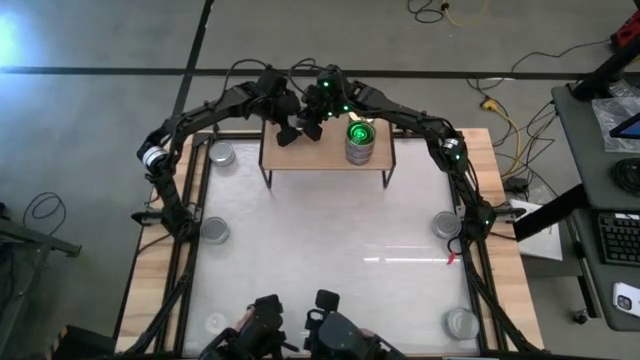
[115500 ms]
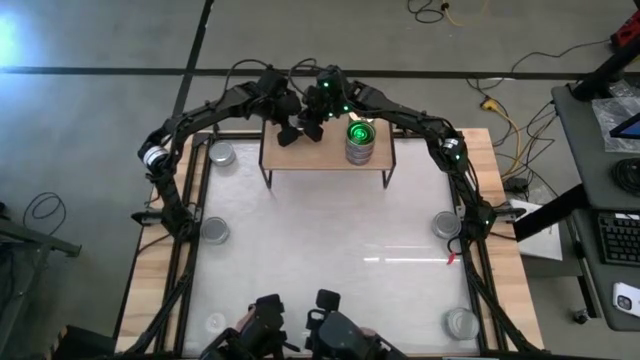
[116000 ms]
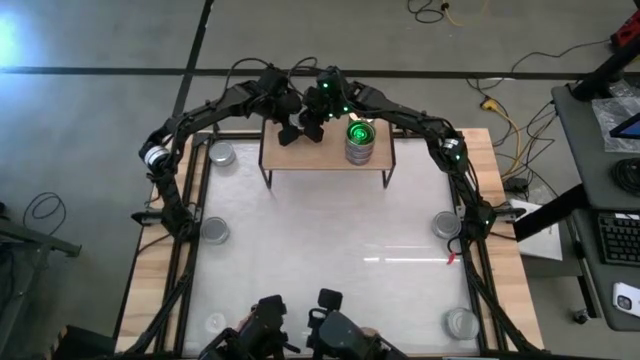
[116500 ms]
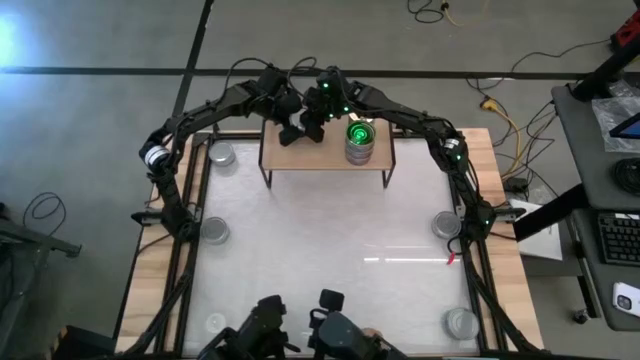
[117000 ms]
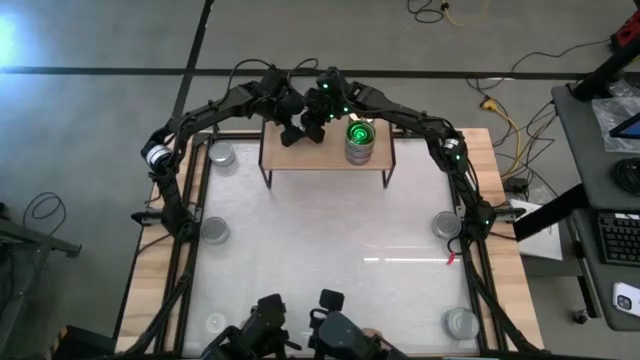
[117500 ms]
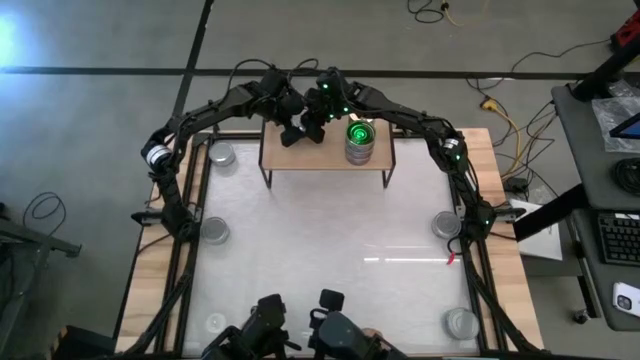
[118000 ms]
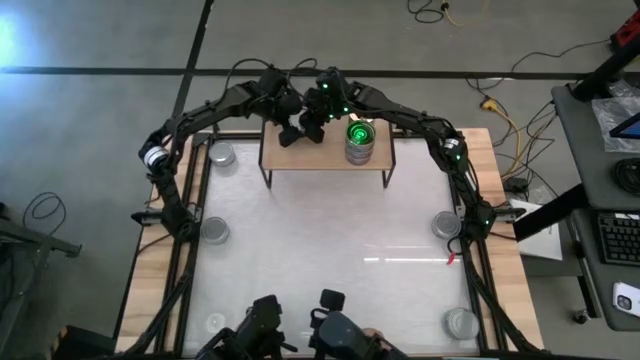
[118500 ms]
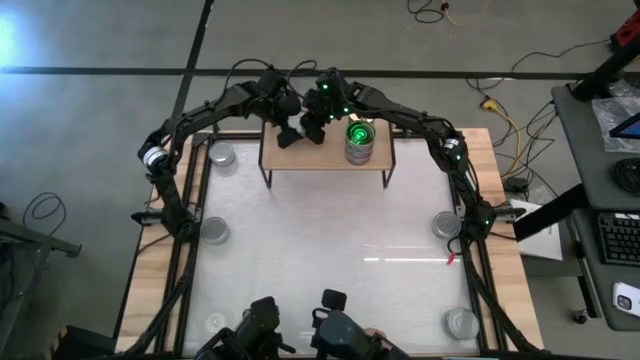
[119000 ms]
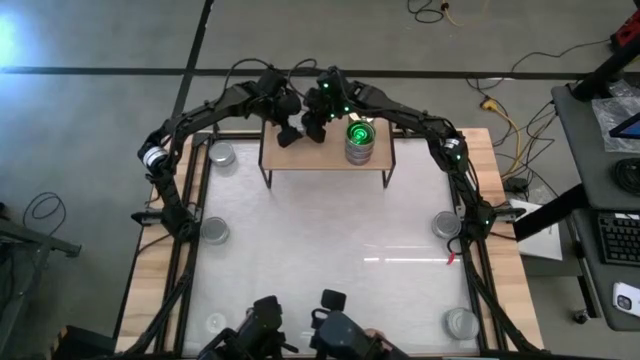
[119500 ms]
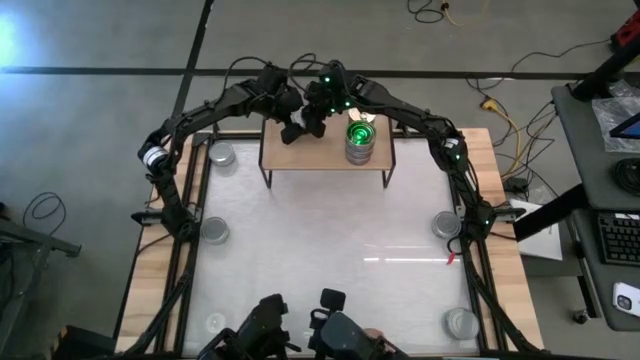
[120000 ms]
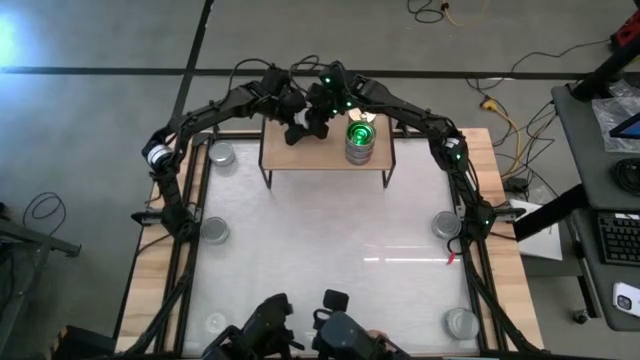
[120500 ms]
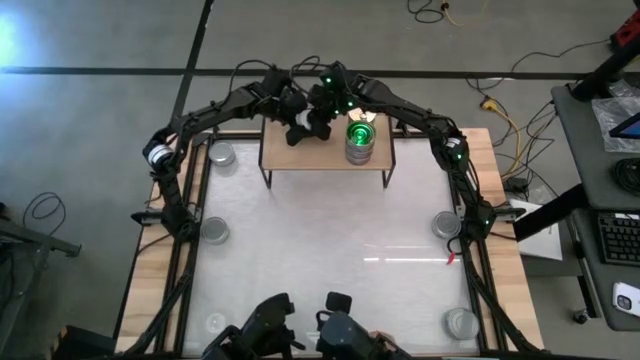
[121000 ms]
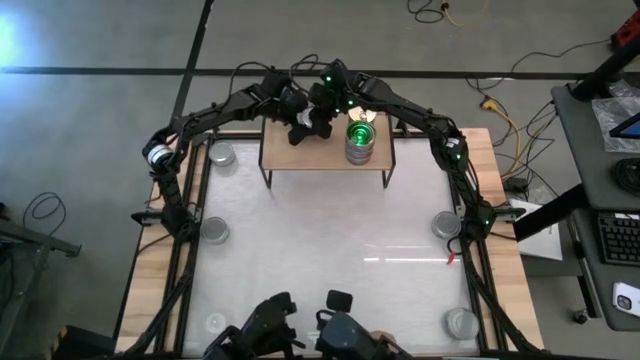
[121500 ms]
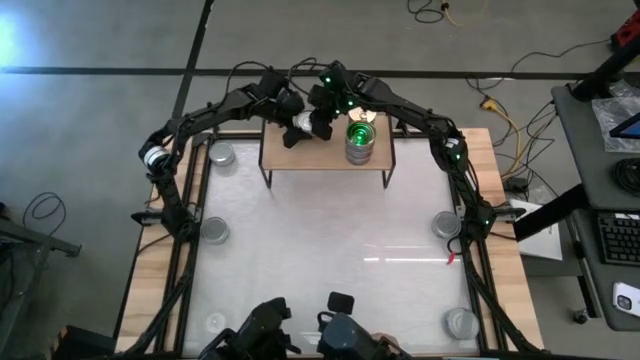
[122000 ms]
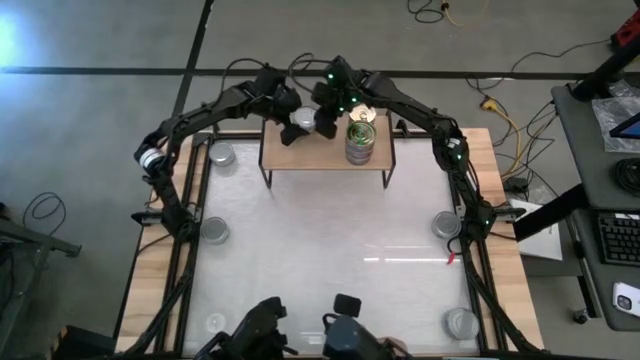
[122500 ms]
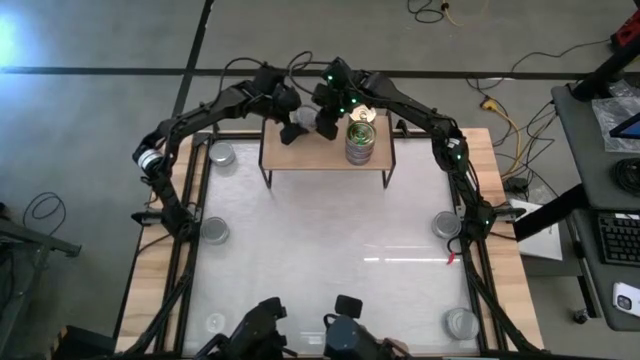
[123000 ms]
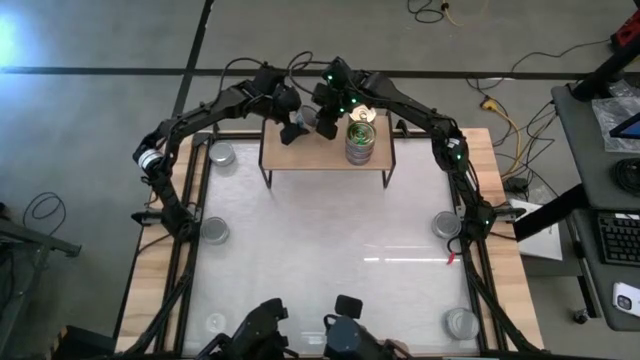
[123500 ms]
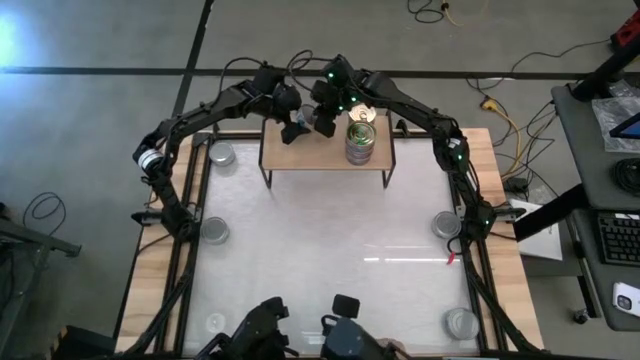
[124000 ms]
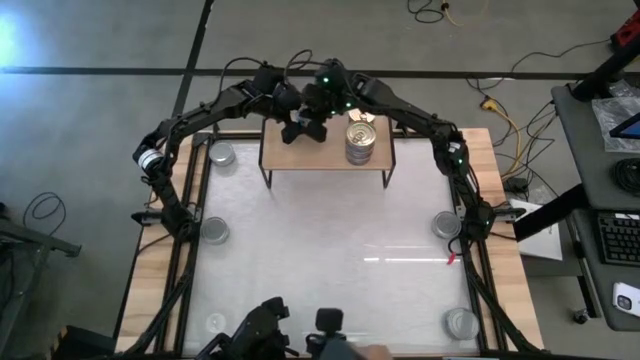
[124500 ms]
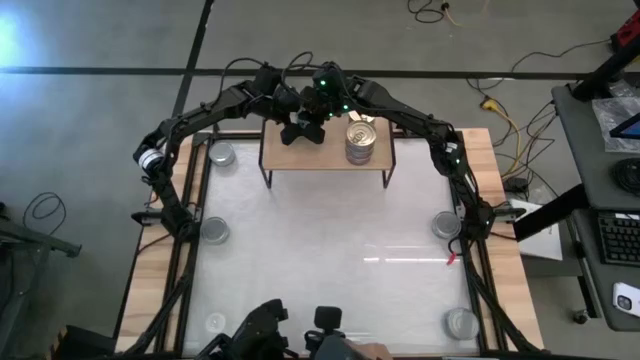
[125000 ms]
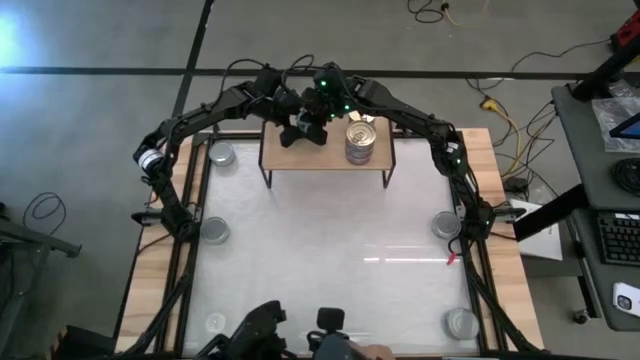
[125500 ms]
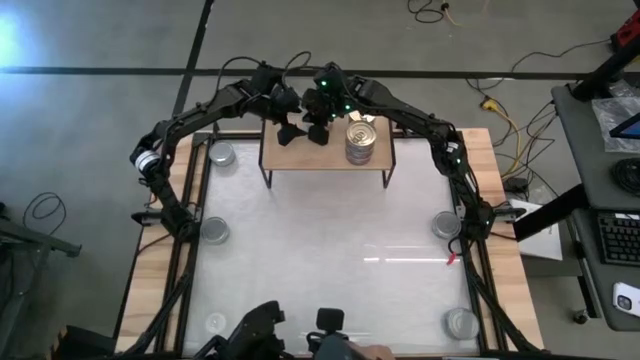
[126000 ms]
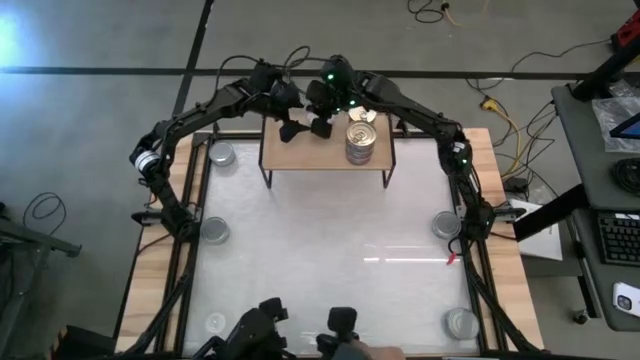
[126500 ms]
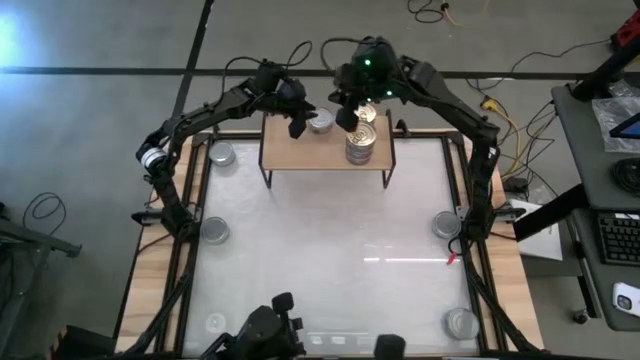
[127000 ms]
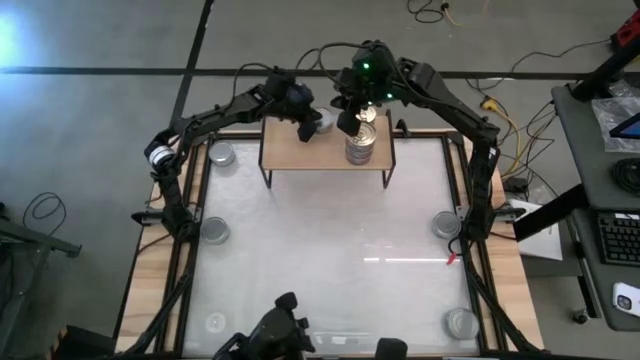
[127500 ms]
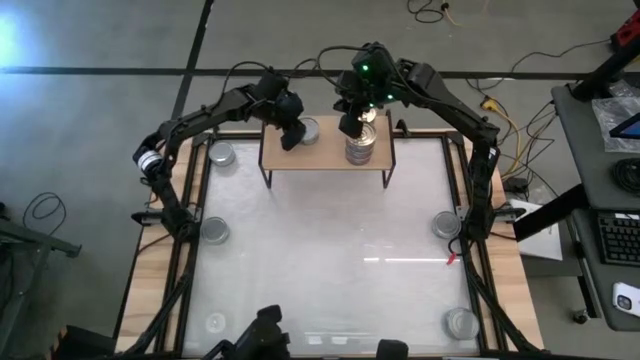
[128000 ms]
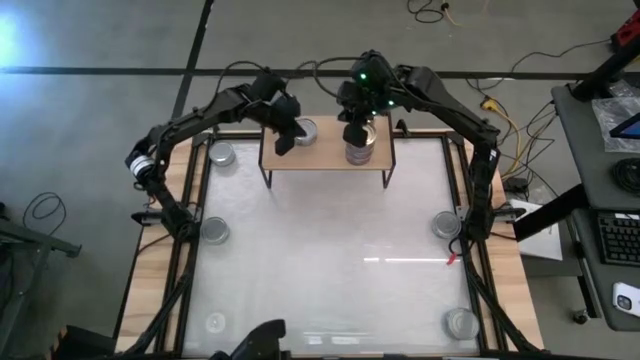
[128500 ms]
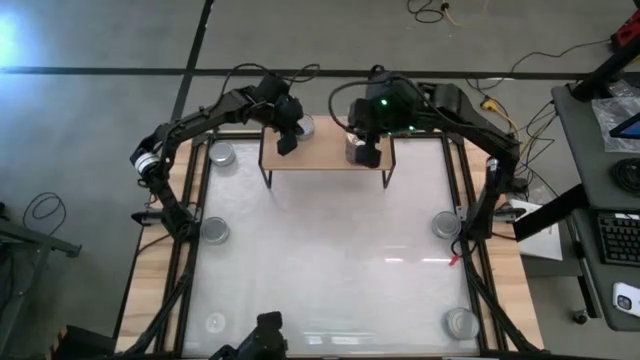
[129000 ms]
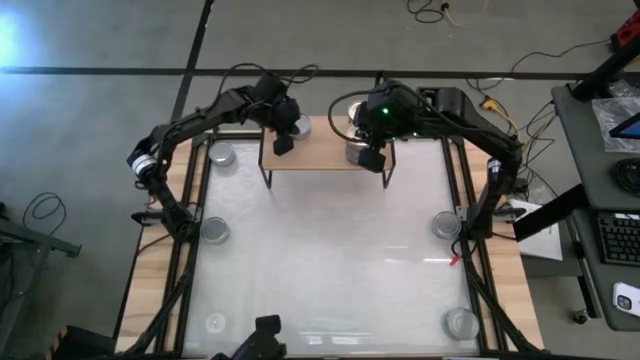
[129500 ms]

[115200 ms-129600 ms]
Task: Stack canned seafood by type on shelf
Put the green tuna on the shelf

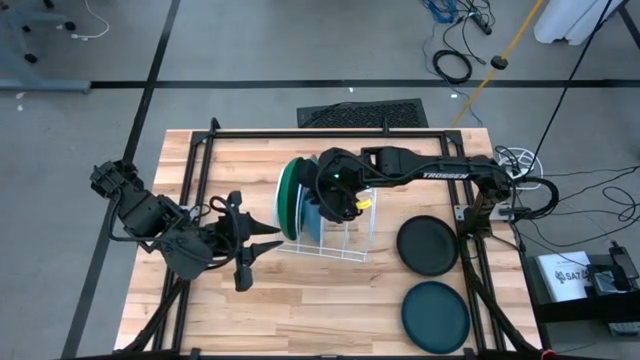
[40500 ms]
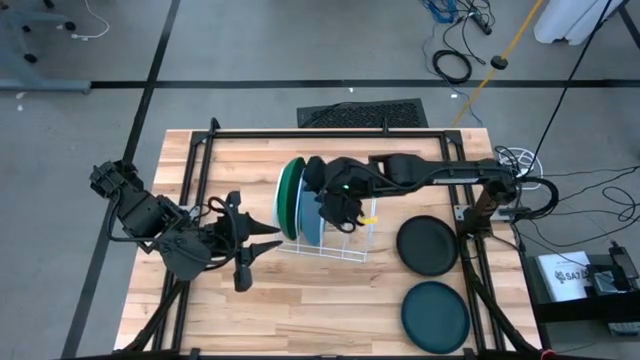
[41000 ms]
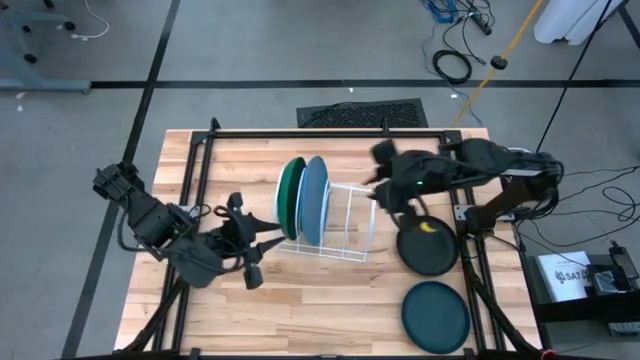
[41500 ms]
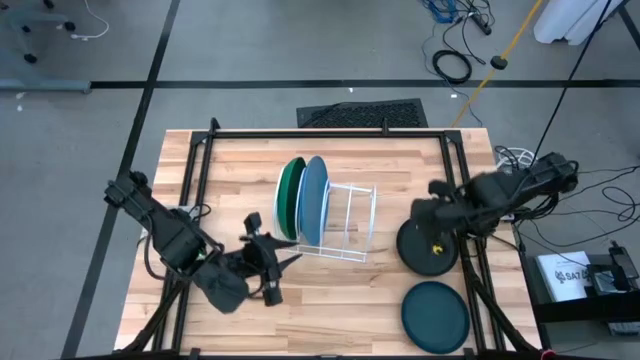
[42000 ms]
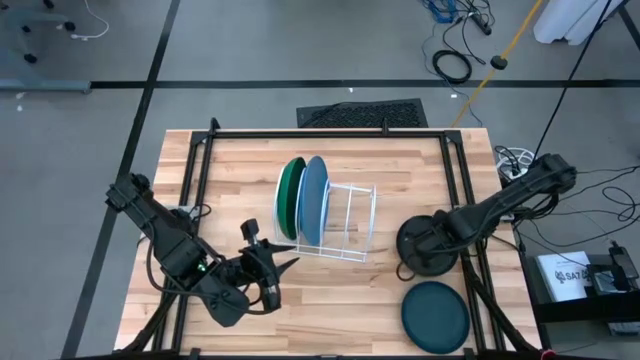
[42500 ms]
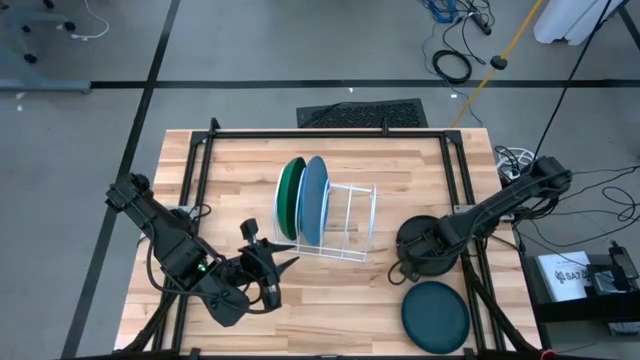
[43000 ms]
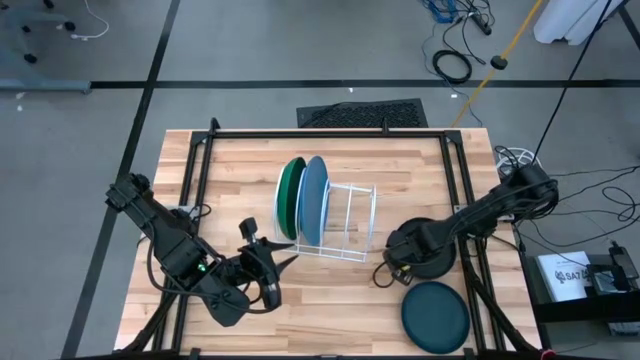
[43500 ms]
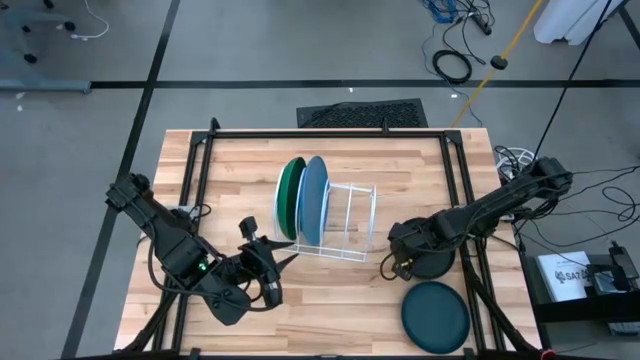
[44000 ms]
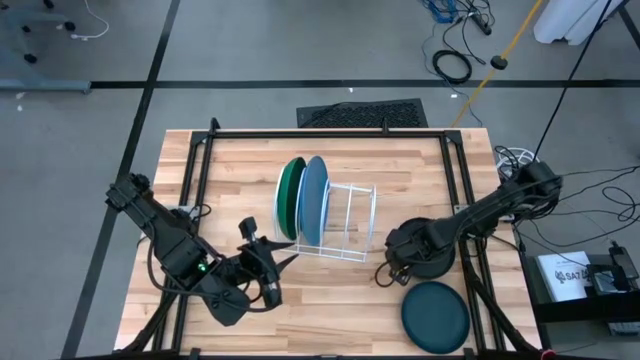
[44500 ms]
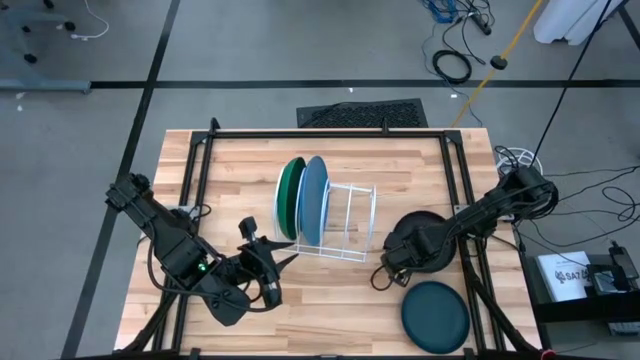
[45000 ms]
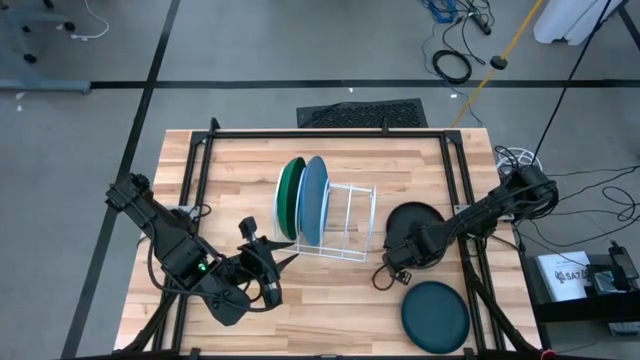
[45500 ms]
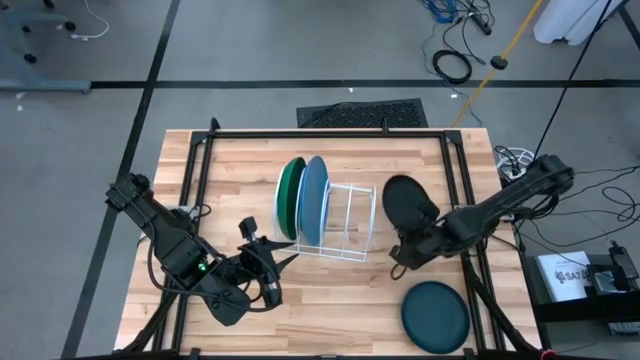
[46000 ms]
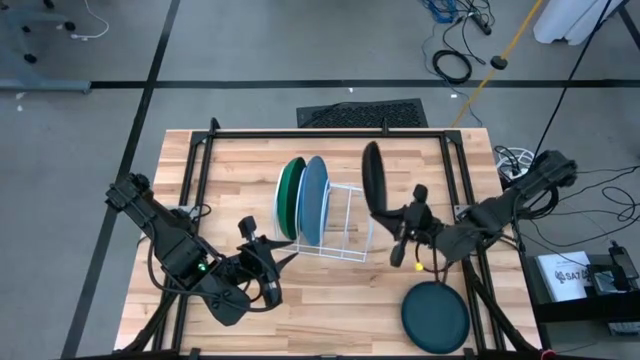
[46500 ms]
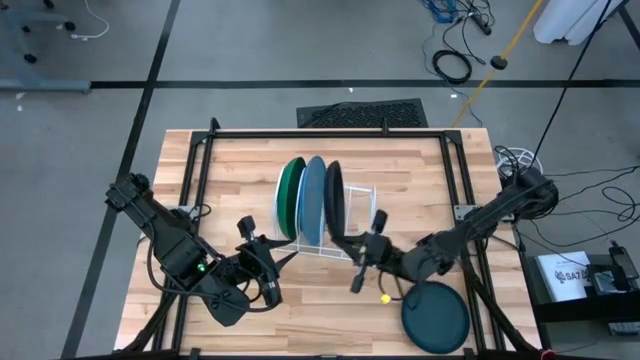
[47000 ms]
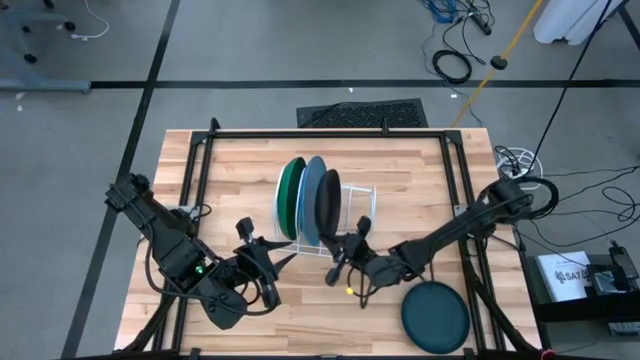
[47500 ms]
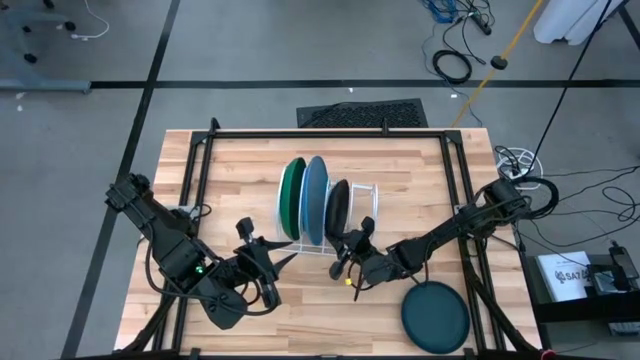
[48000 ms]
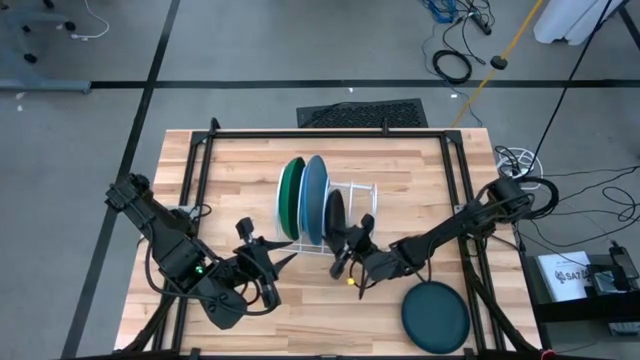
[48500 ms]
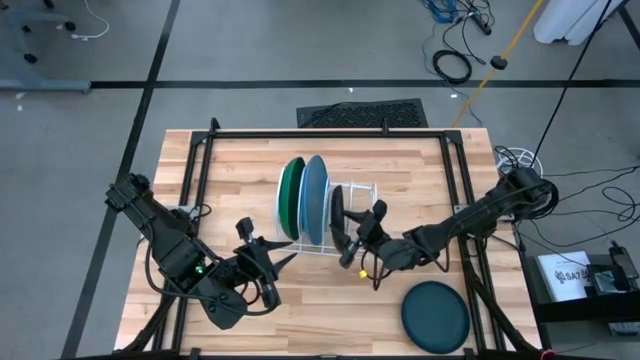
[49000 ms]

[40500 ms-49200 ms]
Task: Sort dishes
Put the black plate into the dish rack
